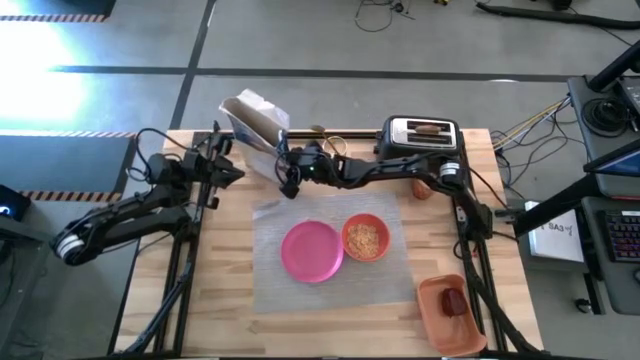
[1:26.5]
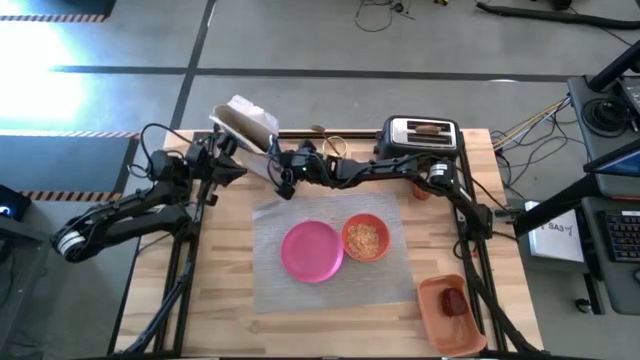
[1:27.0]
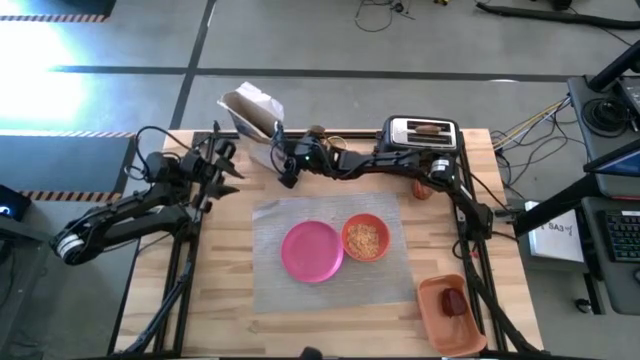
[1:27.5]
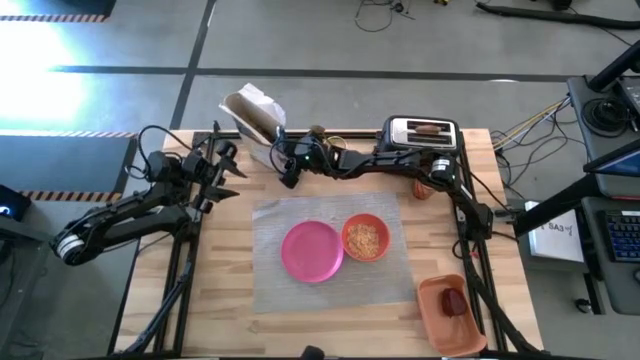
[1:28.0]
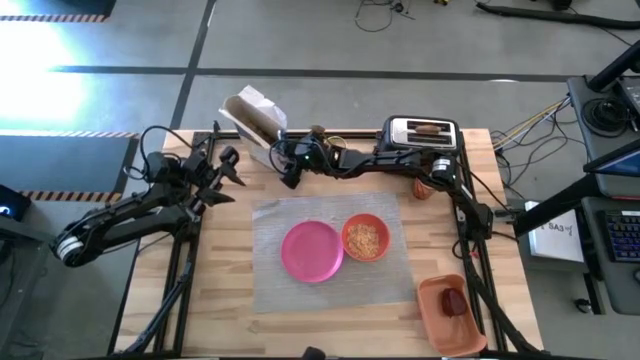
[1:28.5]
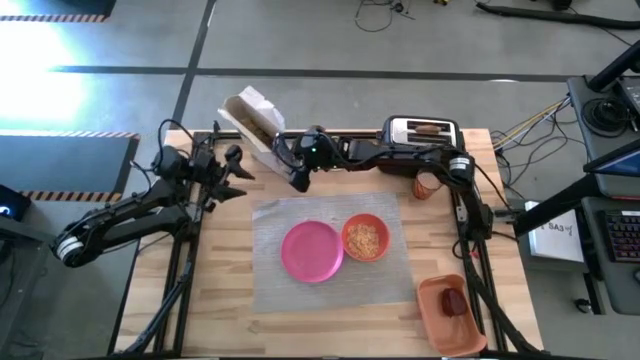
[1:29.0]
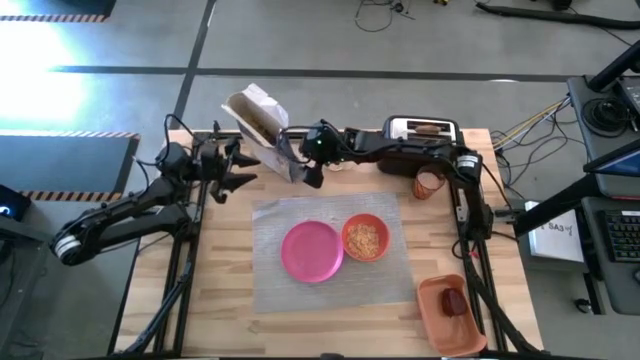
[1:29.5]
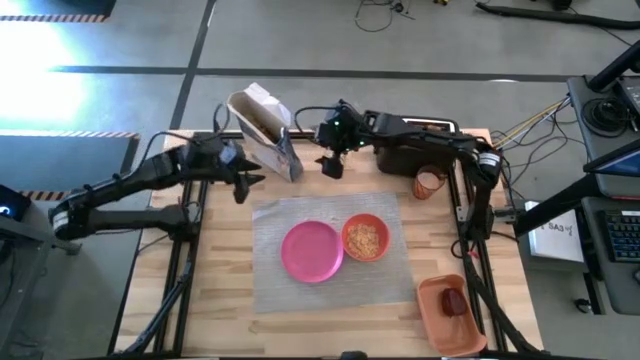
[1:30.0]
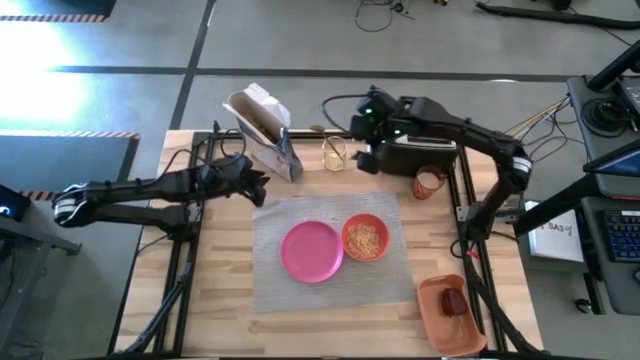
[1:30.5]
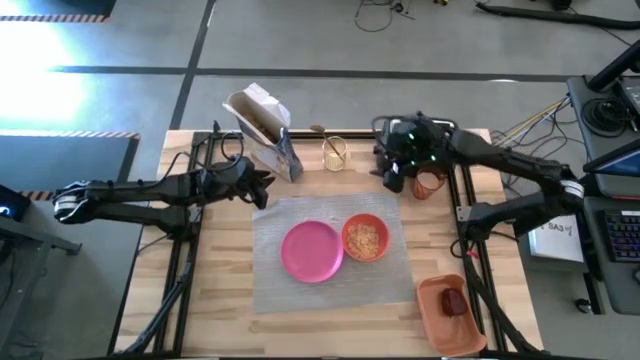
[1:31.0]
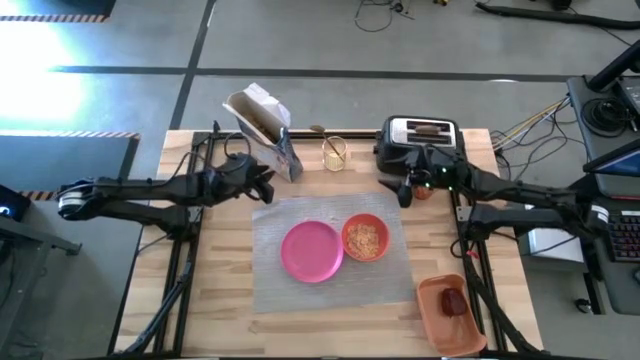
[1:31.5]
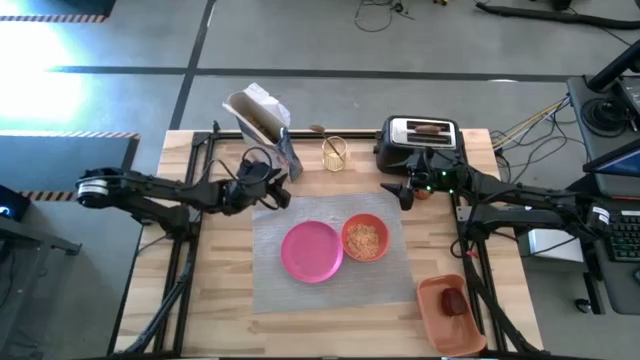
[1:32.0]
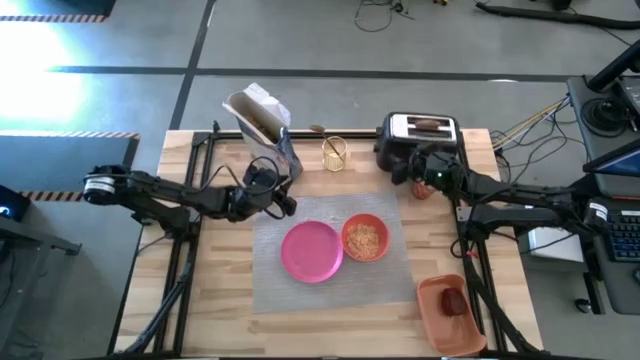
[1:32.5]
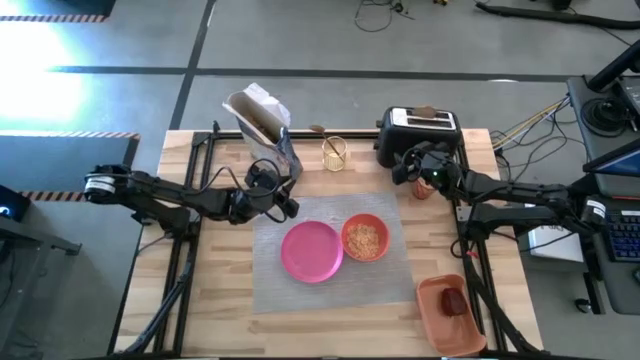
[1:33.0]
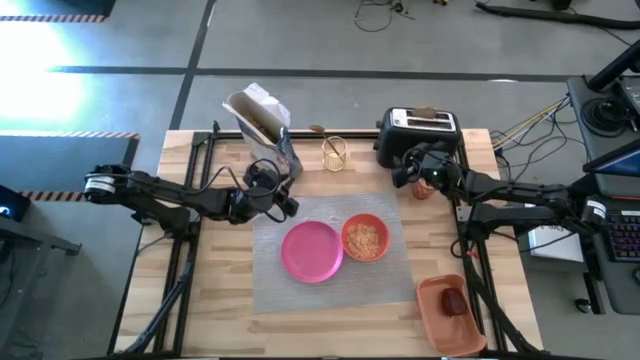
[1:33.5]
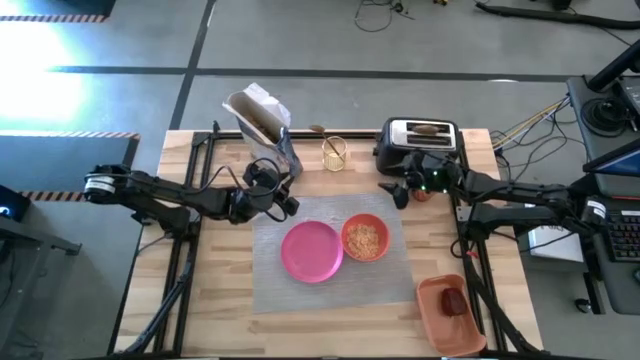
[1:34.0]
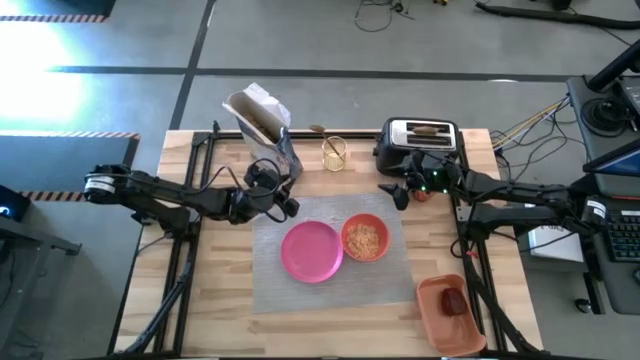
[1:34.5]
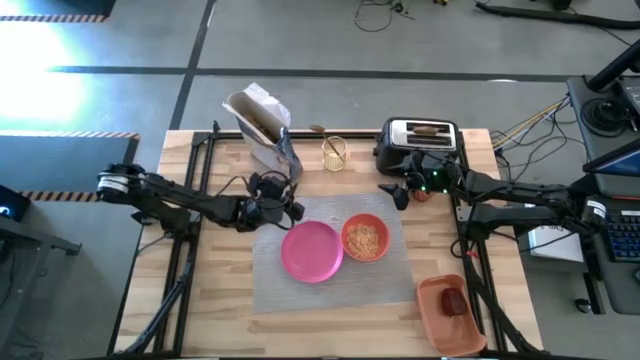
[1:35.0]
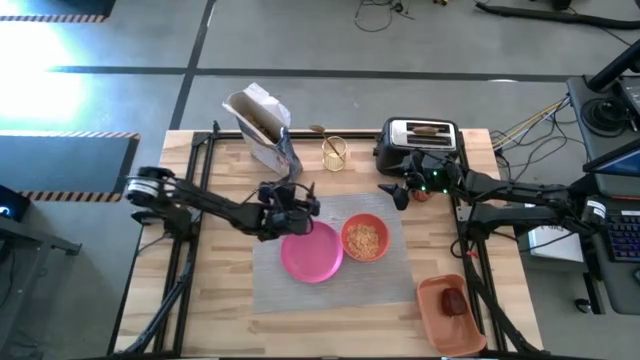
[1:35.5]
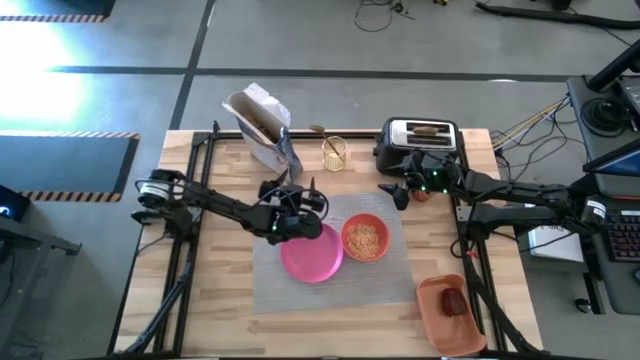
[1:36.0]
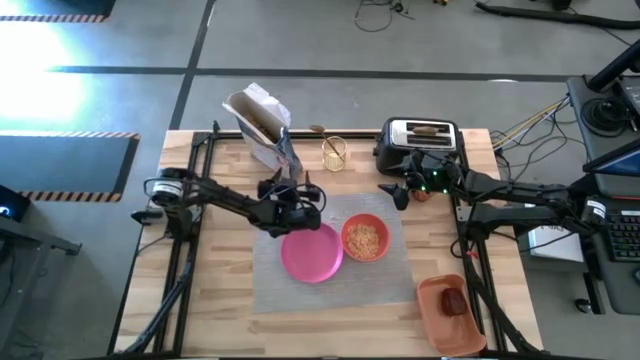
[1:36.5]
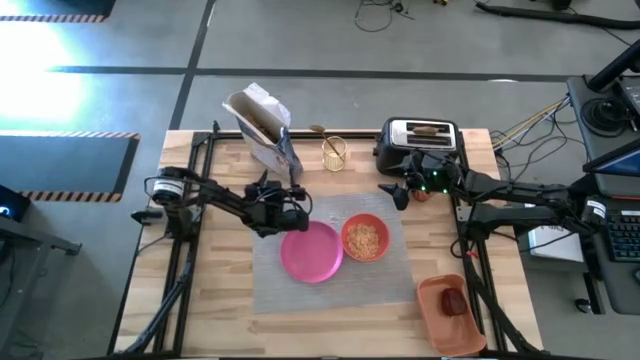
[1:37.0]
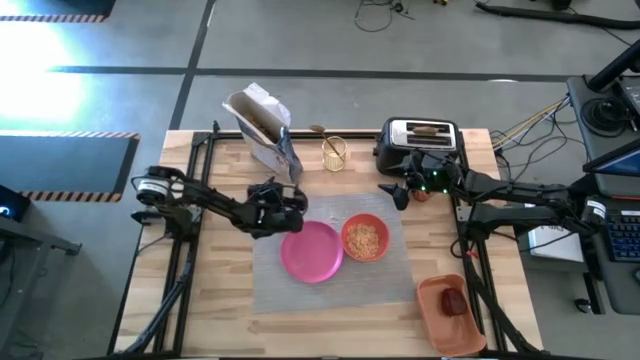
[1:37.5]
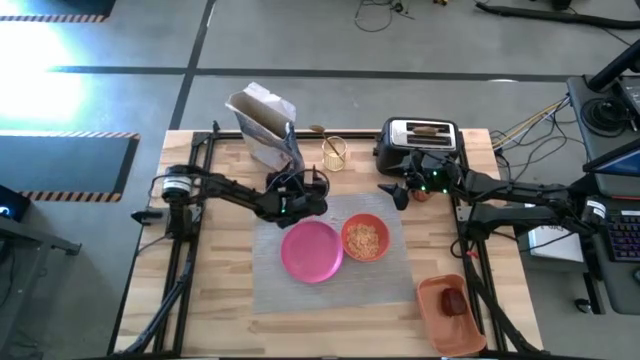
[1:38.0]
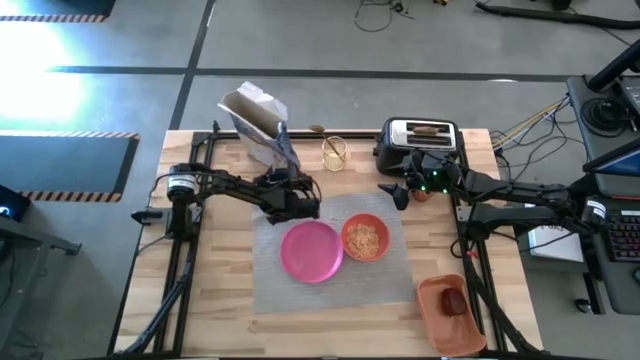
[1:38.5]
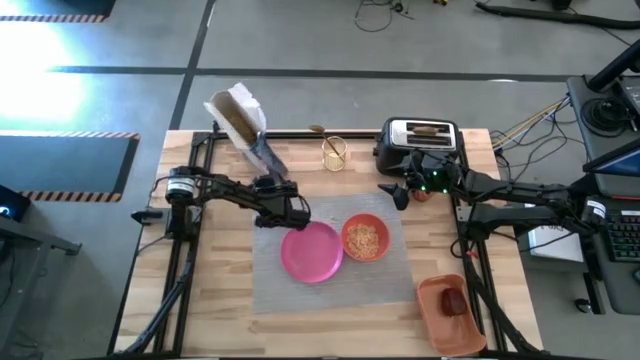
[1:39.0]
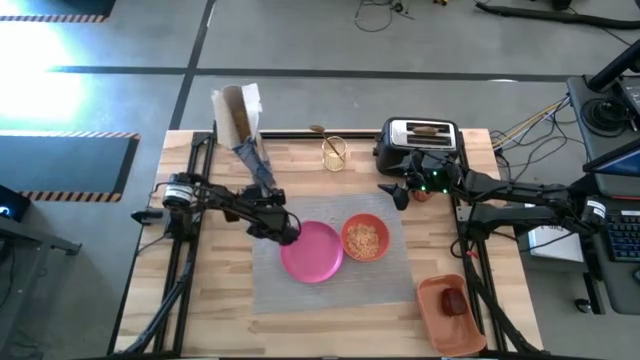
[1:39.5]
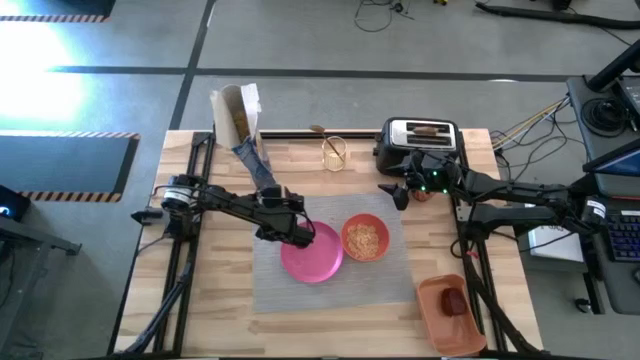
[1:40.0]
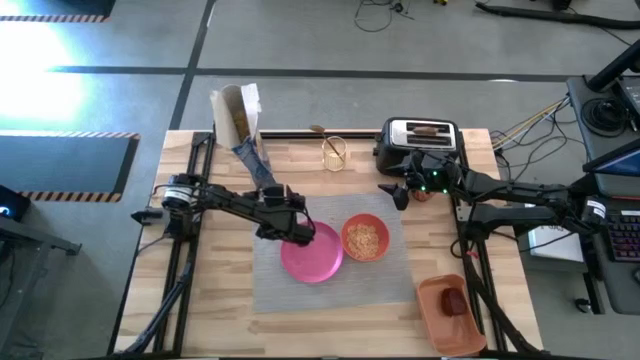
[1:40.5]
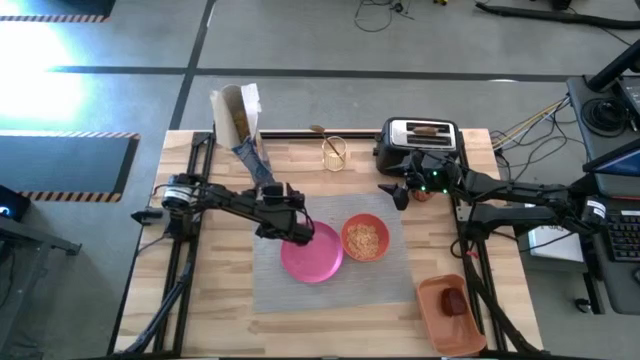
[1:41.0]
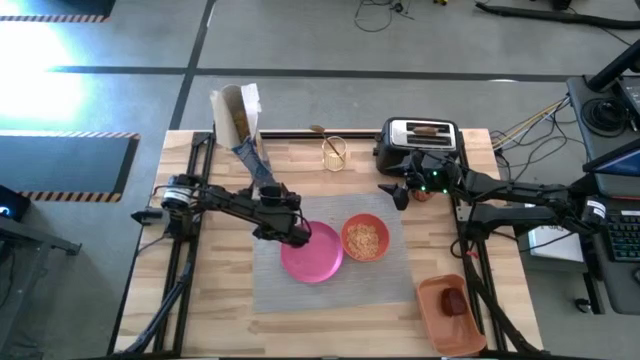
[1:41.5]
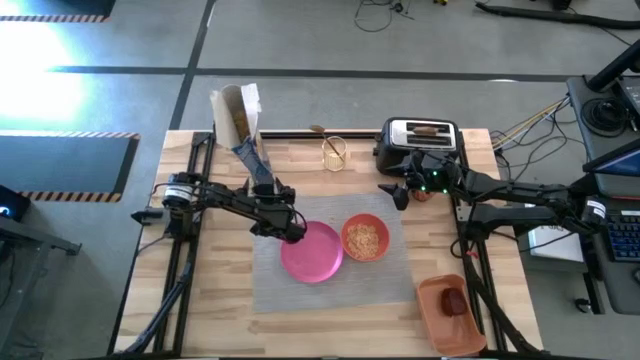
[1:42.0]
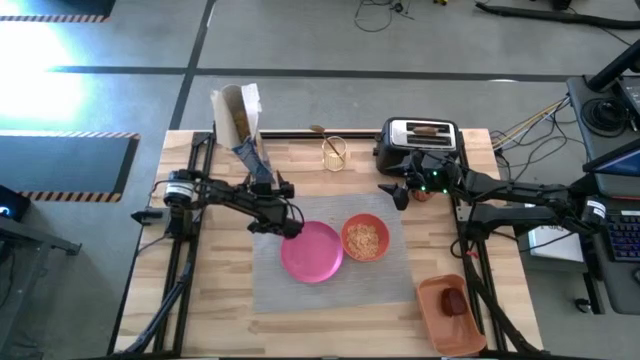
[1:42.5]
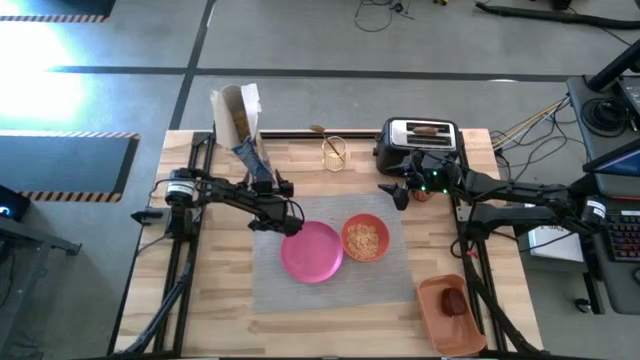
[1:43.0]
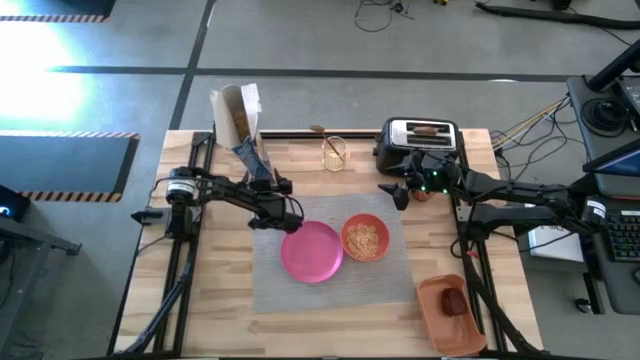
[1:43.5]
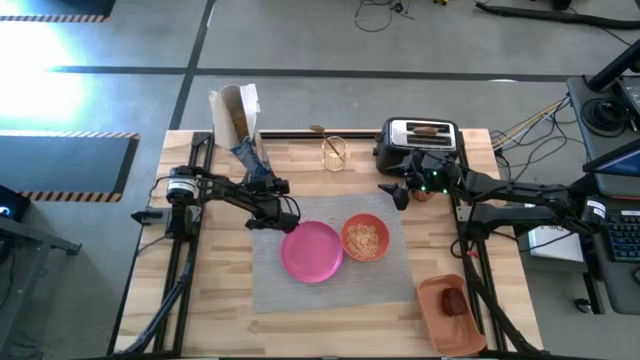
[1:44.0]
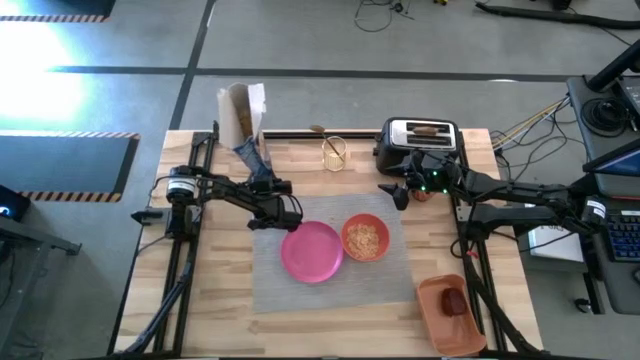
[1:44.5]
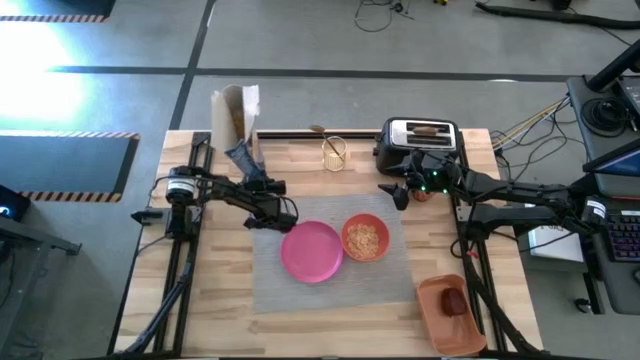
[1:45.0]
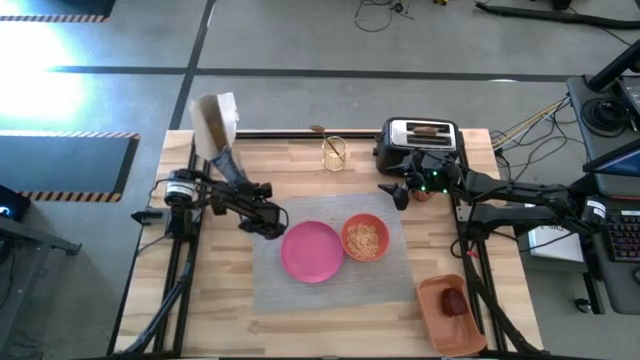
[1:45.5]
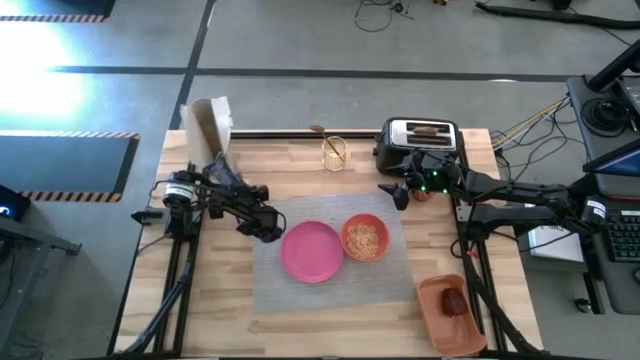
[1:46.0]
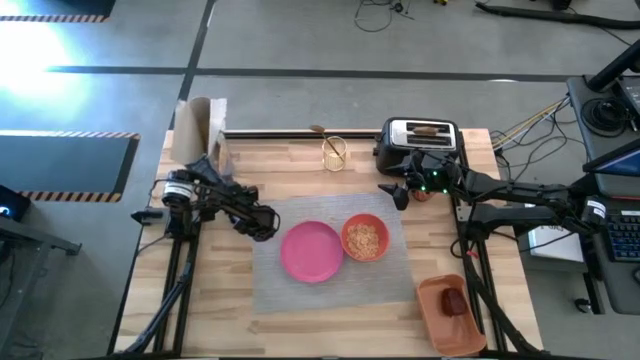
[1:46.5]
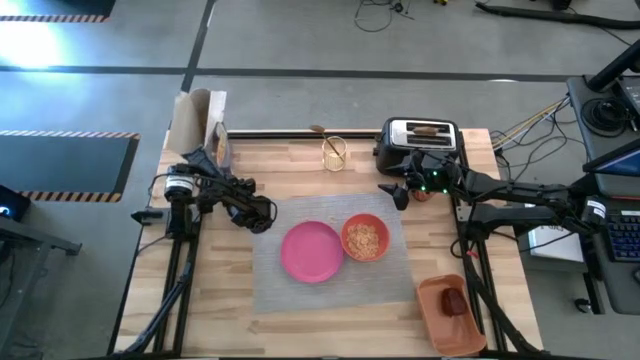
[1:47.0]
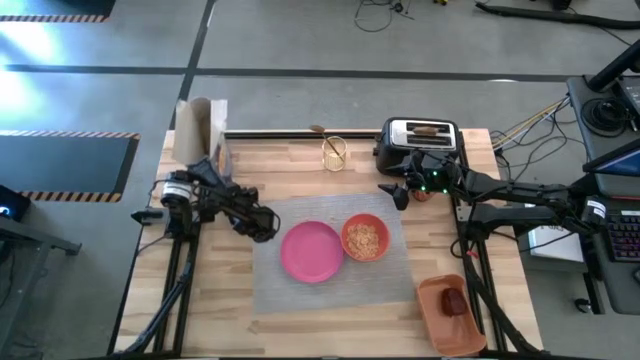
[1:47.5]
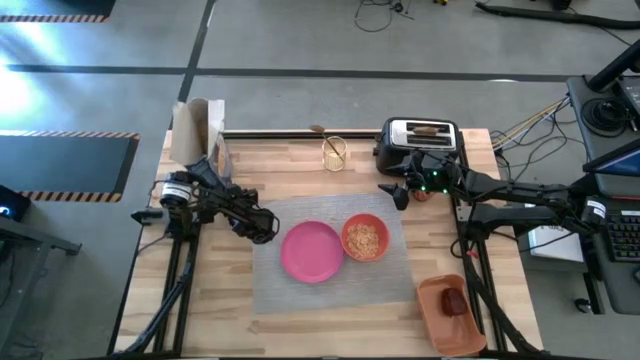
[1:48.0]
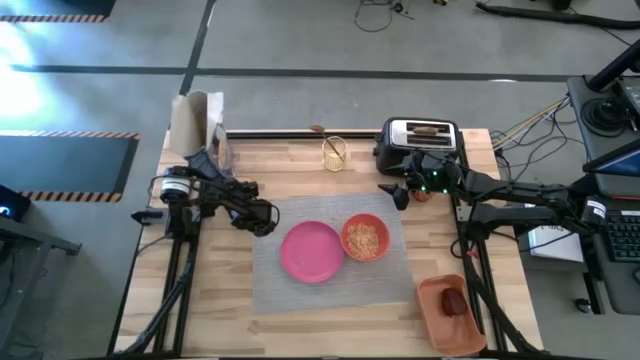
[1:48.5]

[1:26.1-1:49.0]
Task: Arrange a breakfast setting
Pour the cereal from the blue cereal box into the orange bowl on the gray table mat
